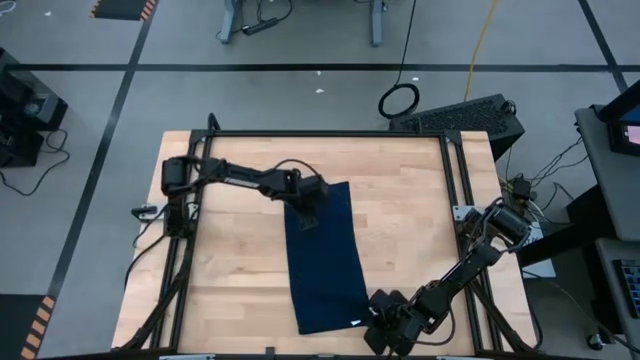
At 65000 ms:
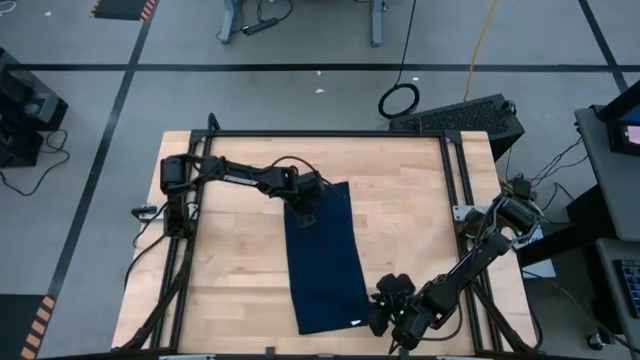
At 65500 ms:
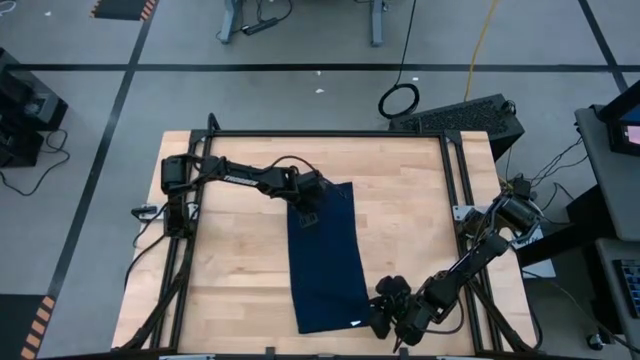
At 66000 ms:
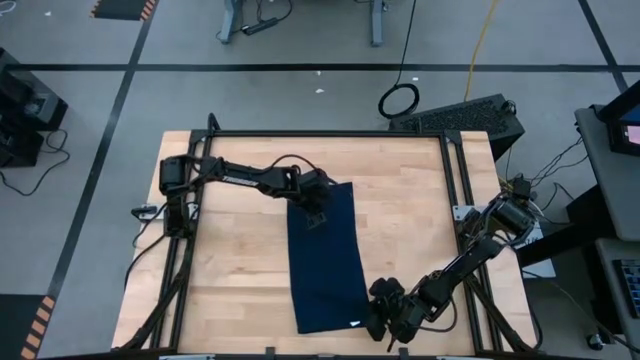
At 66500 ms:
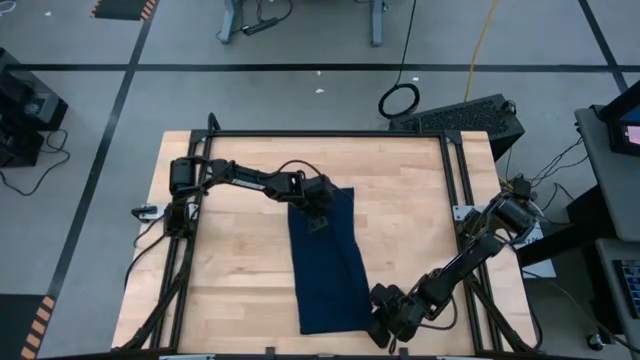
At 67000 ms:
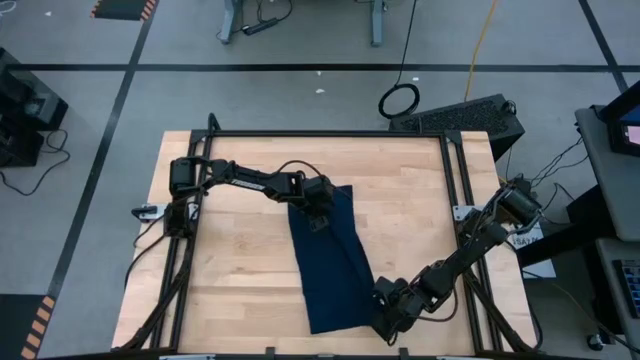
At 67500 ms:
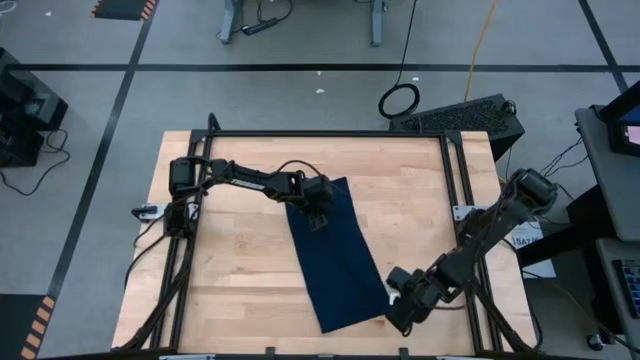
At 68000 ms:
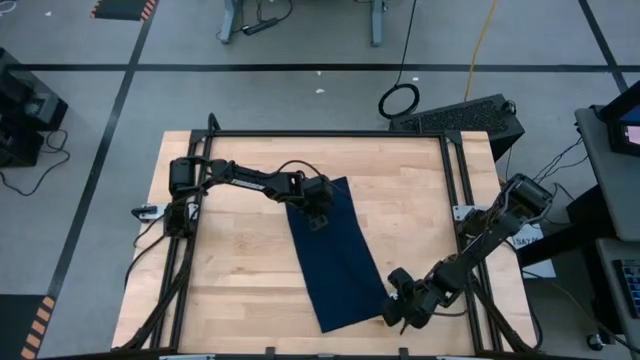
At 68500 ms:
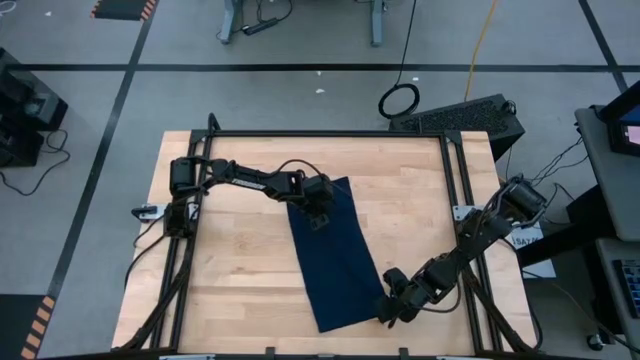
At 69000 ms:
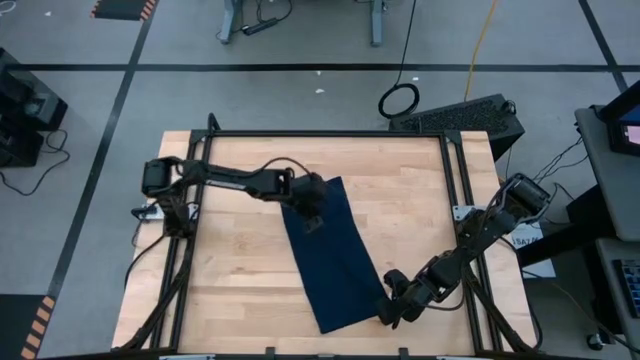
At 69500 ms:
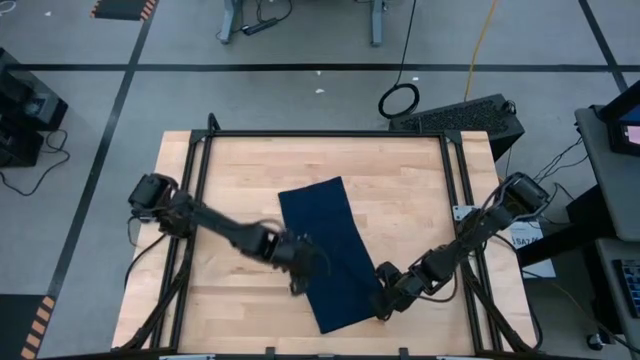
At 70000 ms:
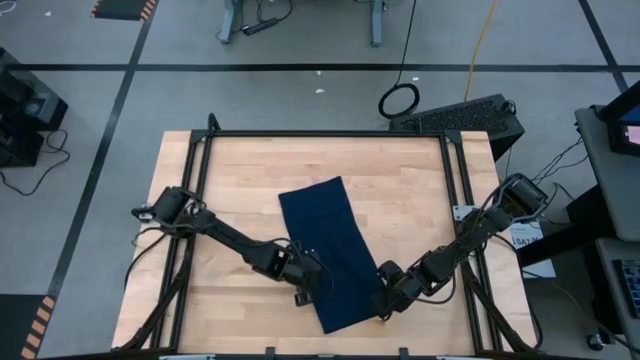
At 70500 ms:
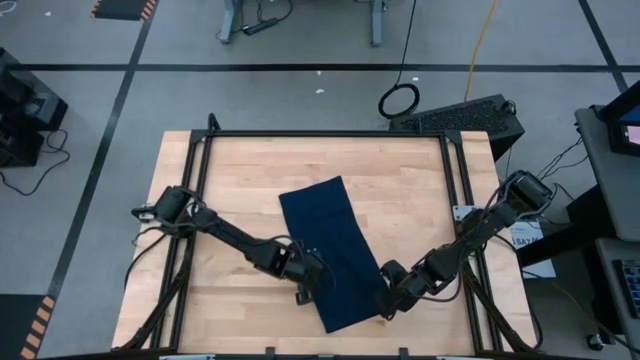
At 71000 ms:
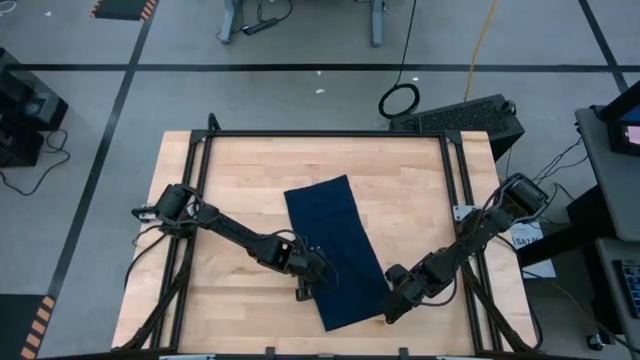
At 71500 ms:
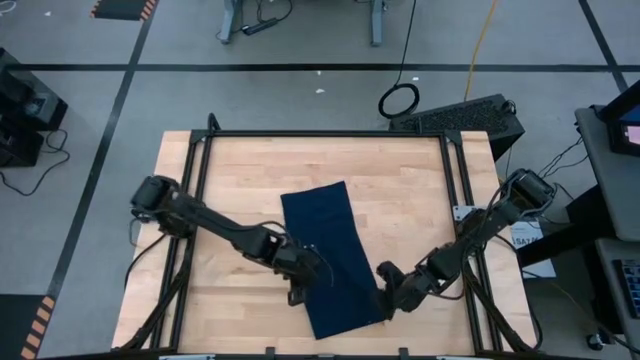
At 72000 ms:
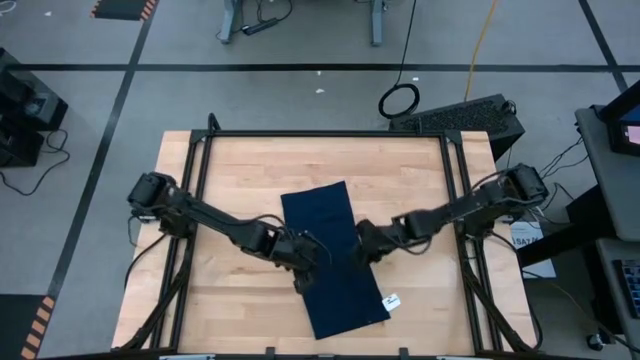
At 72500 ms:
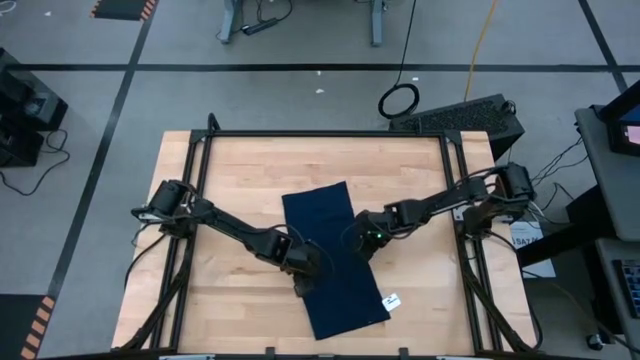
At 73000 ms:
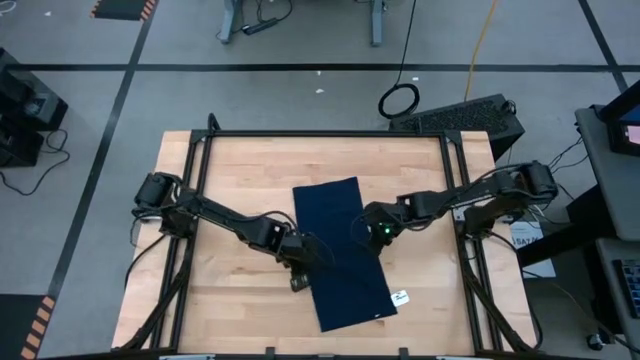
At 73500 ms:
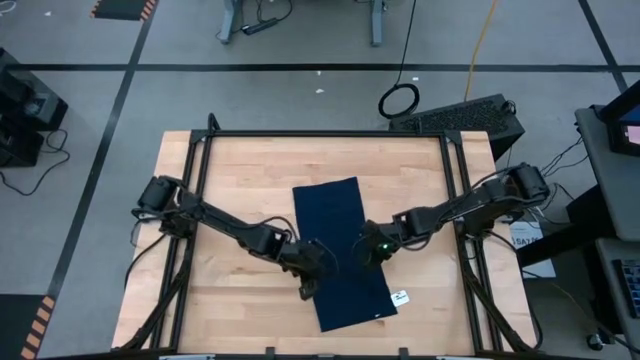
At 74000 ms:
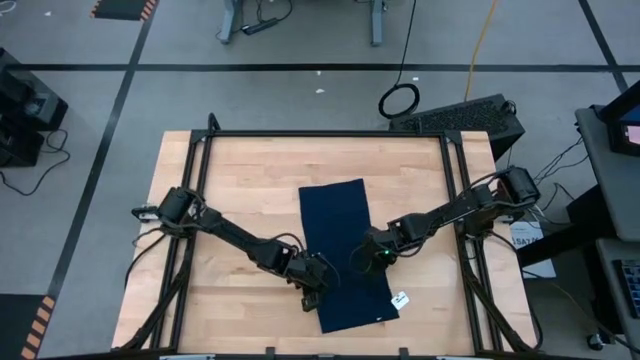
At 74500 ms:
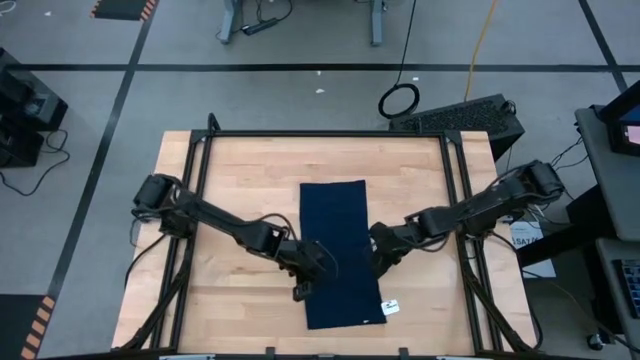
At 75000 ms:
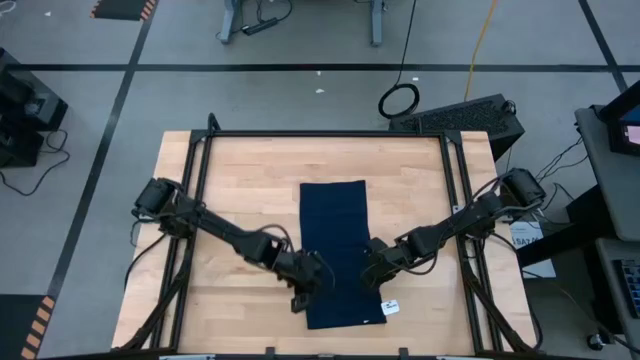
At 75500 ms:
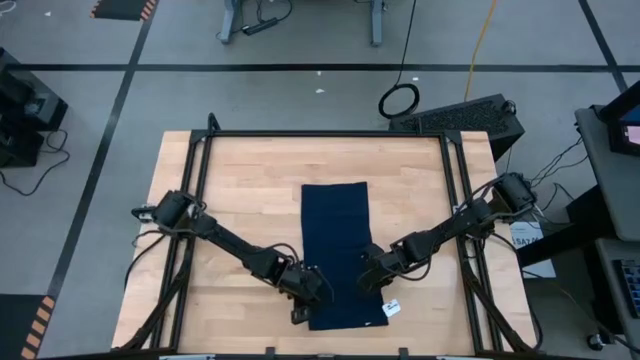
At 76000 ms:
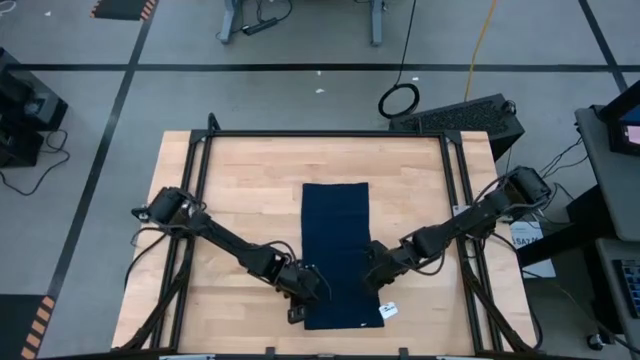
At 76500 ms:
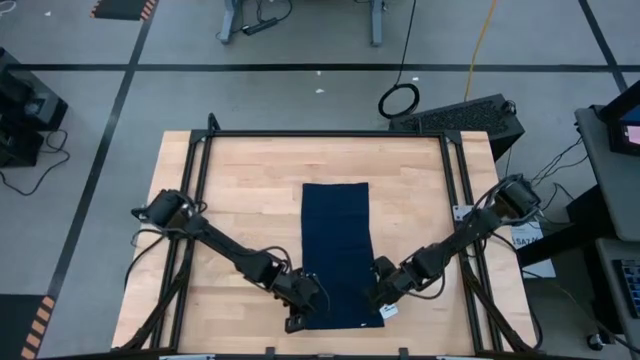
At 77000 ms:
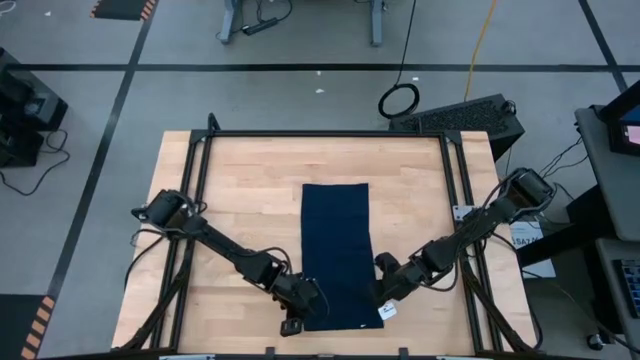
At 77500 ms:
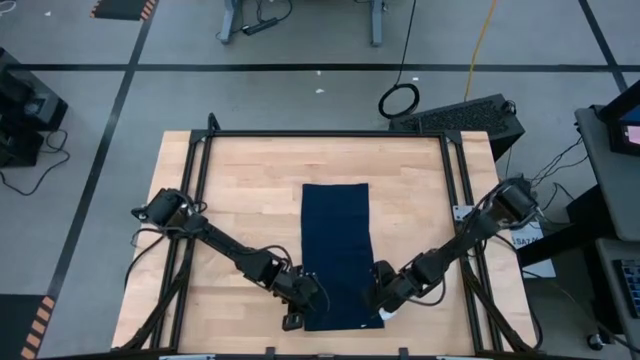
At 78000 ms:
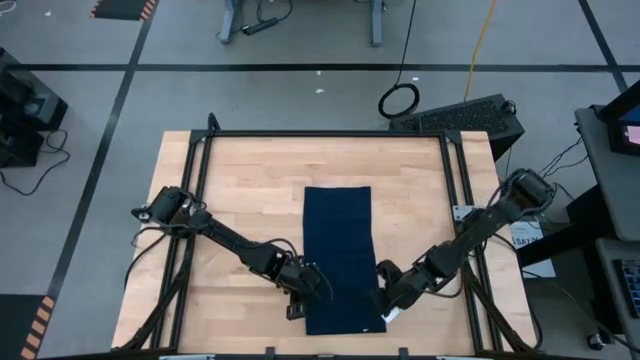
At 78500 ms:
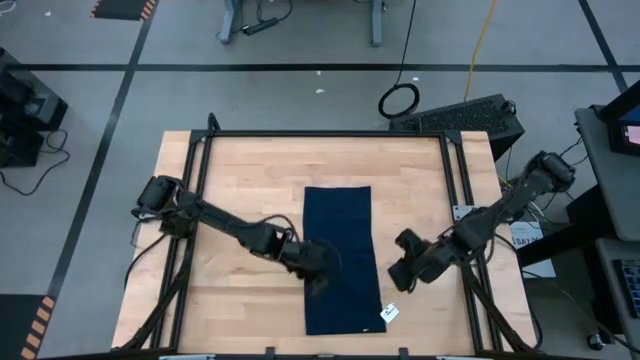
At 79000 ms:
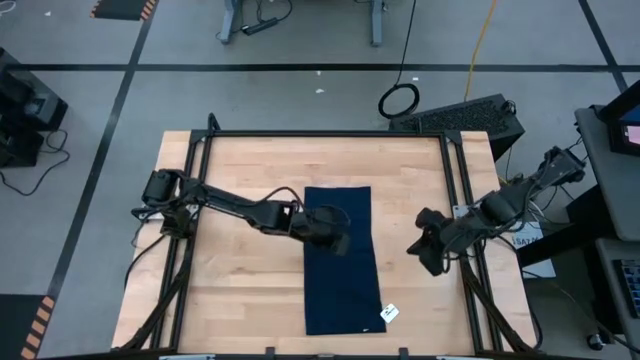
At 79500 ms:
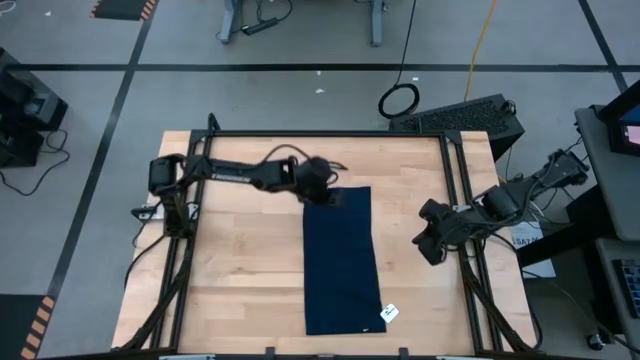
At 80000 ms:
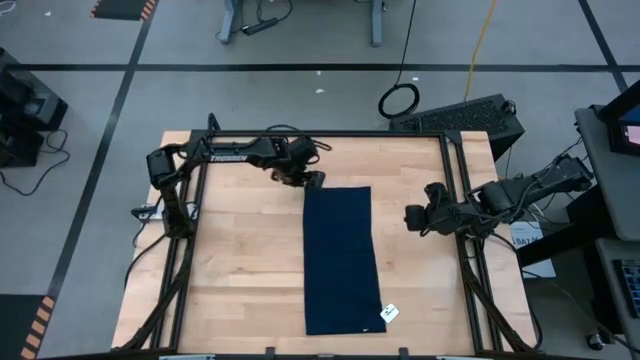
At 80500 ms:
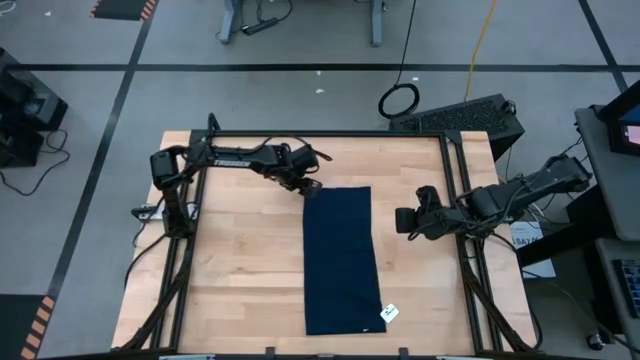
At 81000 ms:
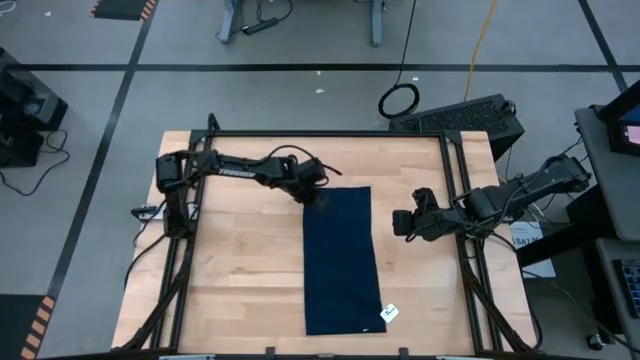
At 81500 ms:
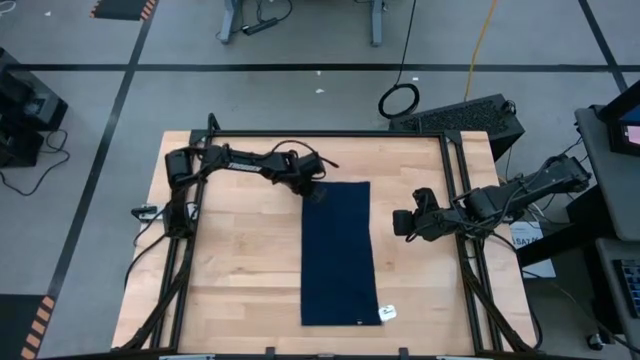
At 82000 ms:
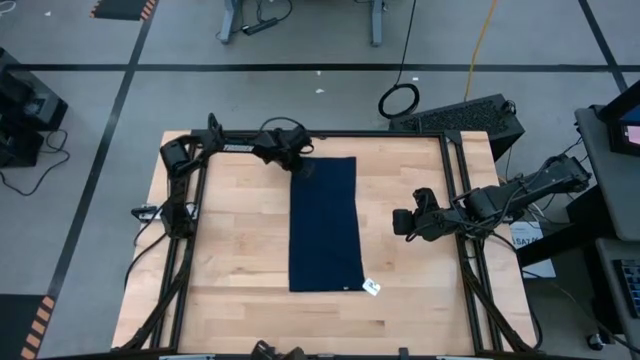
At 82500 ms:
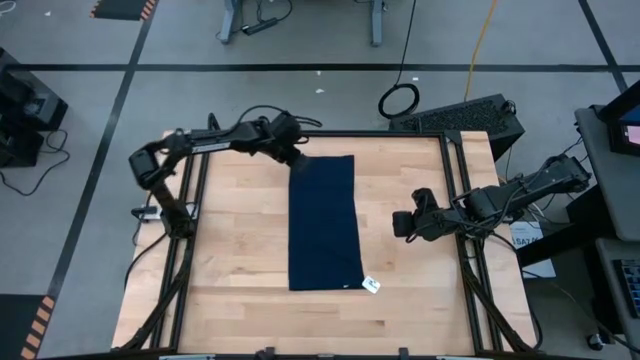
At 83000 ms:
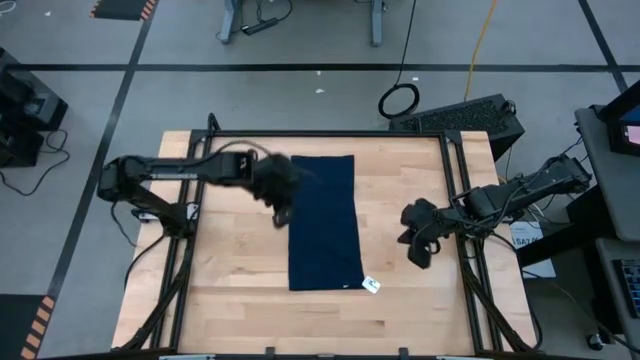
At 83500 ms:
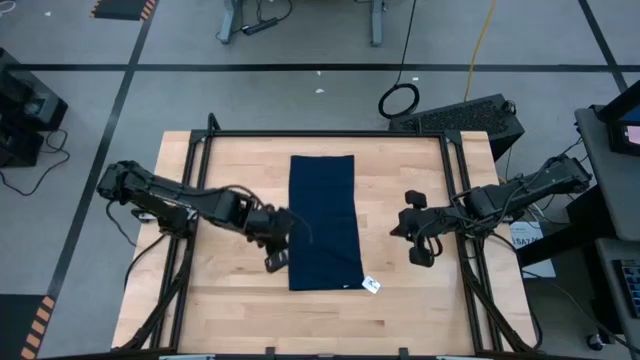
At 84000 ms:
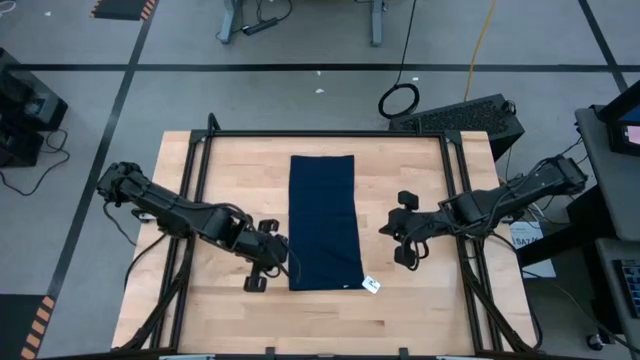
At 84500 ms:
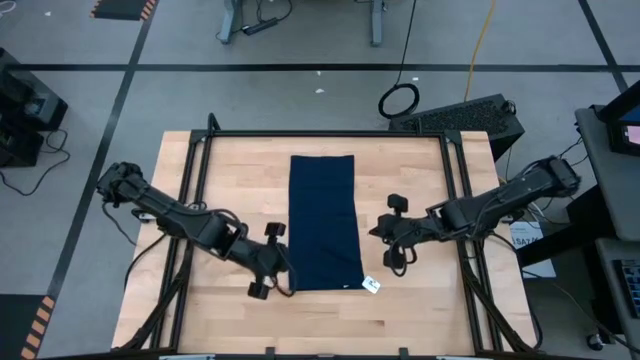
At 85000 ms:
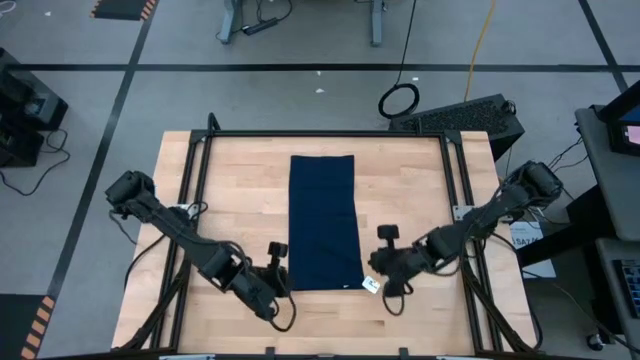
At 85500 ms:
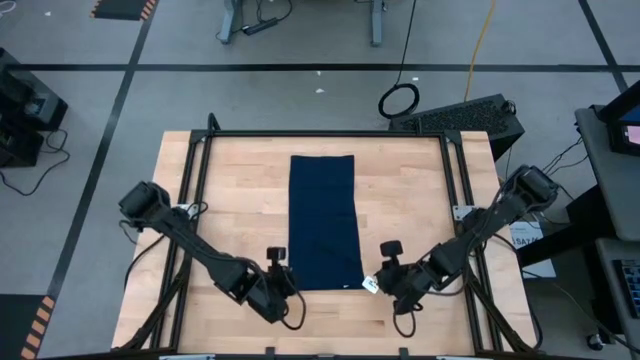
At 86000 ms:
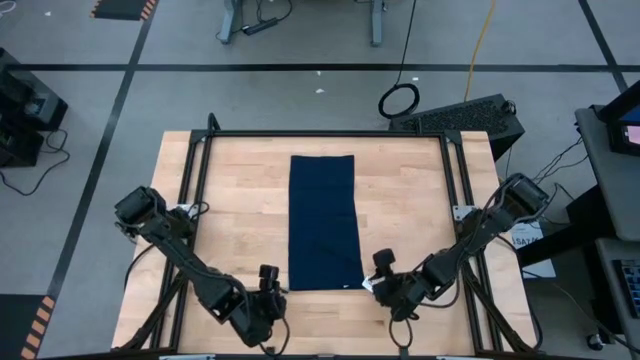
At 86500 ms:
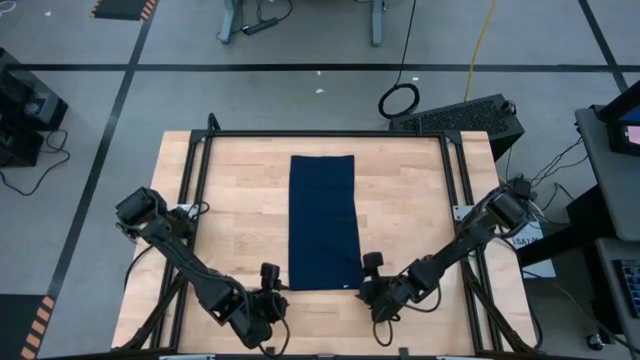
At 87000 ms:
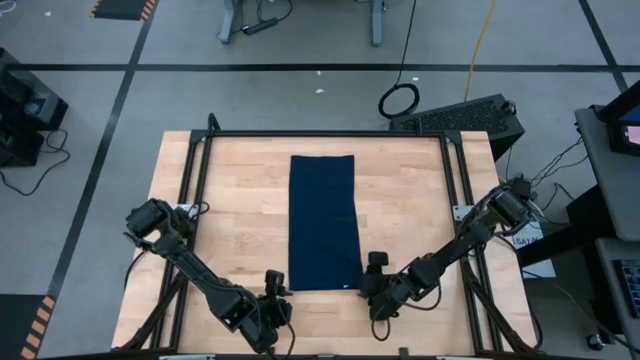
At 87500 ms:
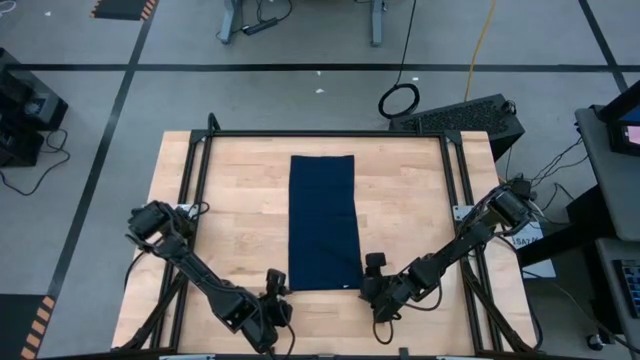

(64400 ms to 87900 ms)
Task: Roll towel
Roll the dark blue towel
